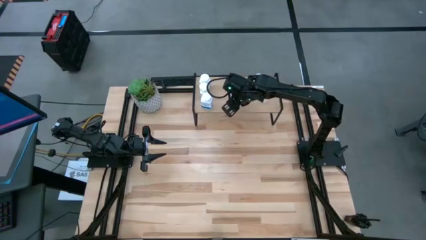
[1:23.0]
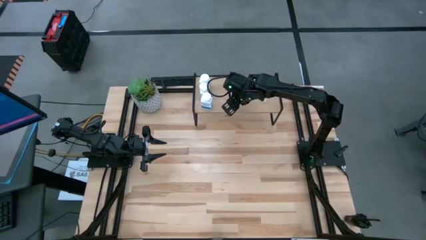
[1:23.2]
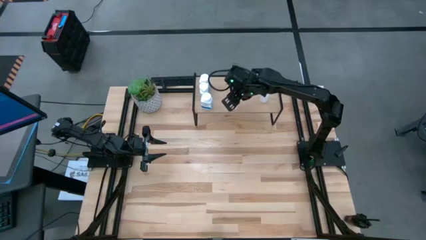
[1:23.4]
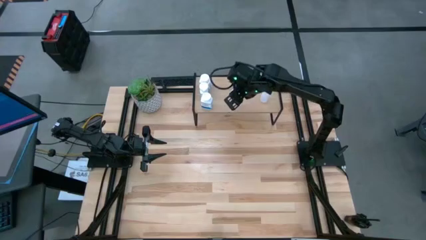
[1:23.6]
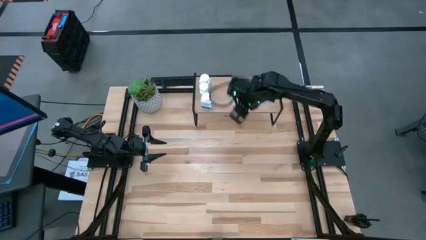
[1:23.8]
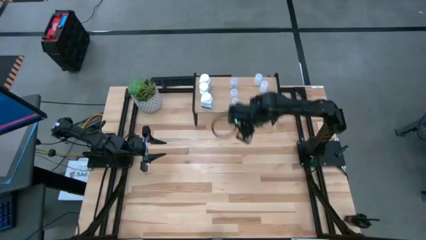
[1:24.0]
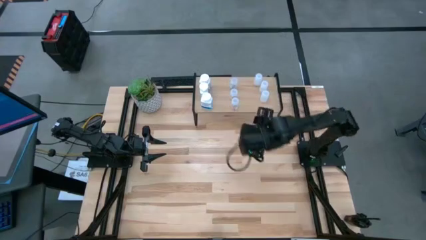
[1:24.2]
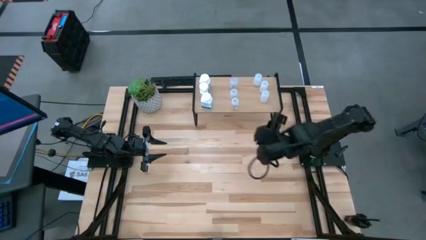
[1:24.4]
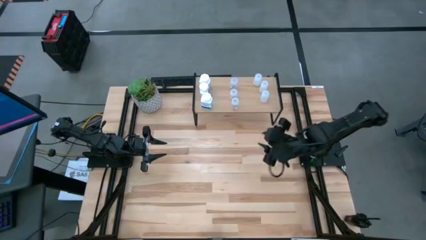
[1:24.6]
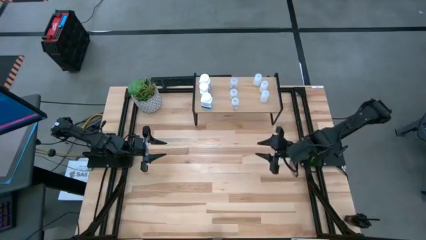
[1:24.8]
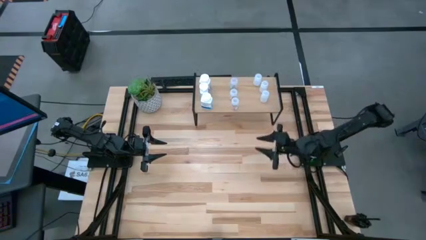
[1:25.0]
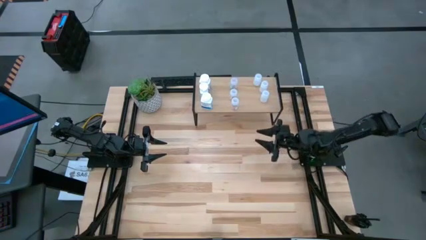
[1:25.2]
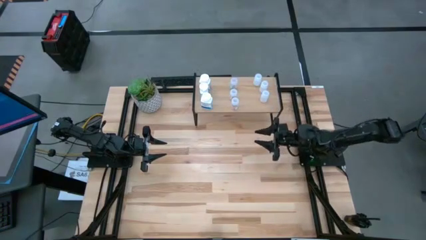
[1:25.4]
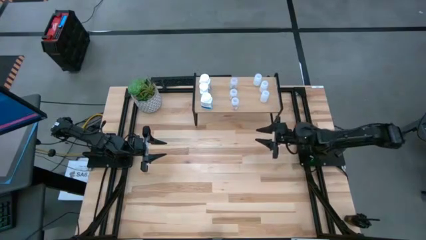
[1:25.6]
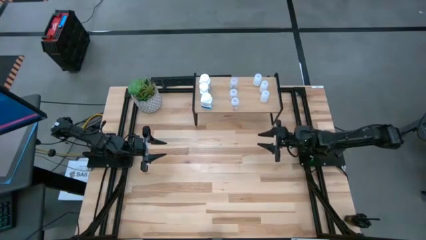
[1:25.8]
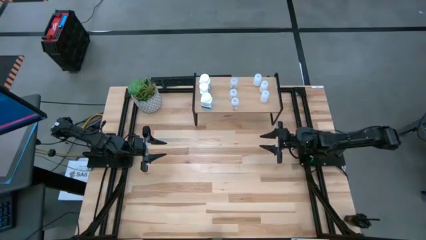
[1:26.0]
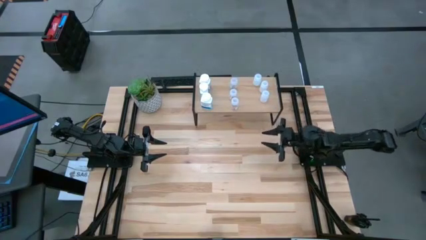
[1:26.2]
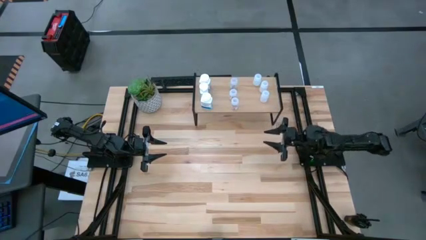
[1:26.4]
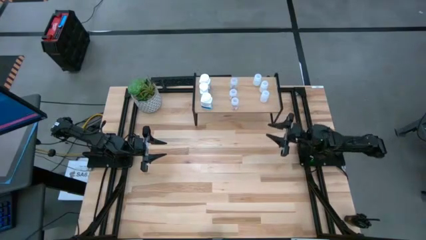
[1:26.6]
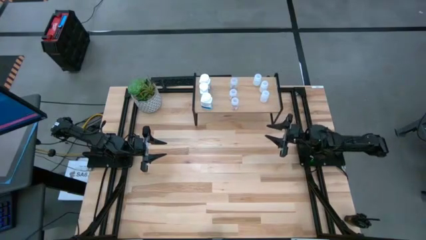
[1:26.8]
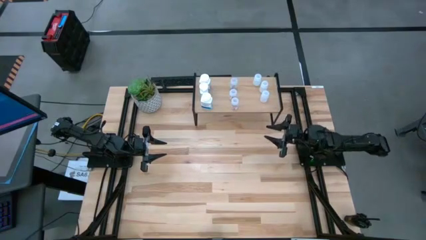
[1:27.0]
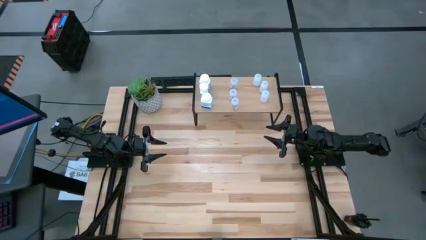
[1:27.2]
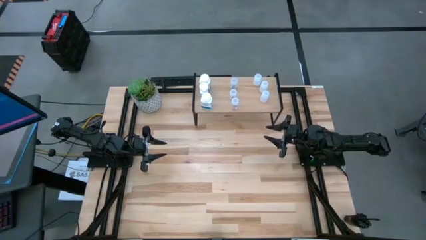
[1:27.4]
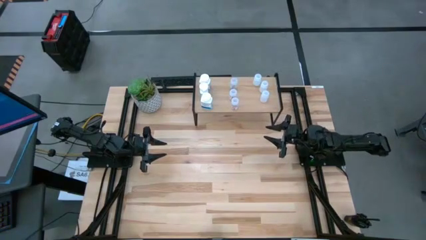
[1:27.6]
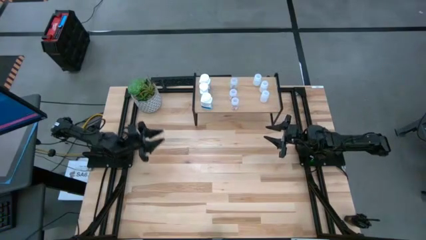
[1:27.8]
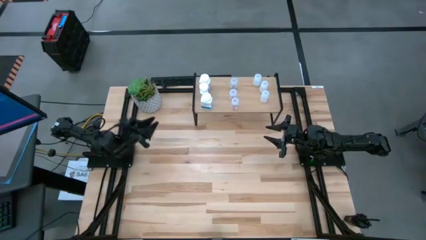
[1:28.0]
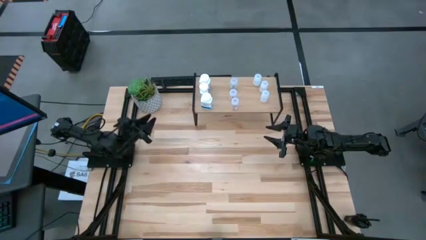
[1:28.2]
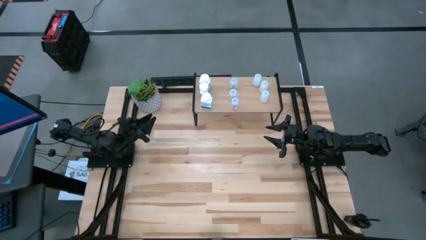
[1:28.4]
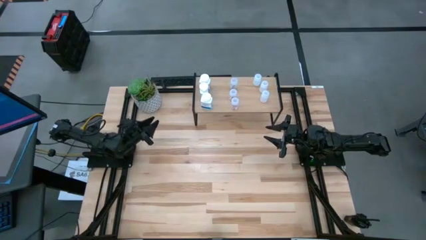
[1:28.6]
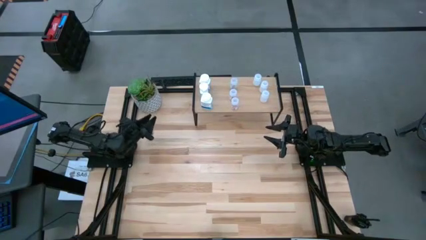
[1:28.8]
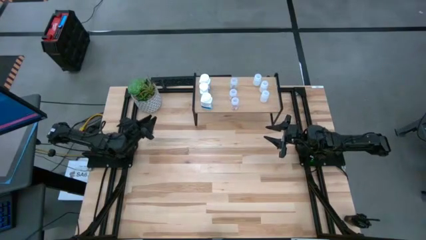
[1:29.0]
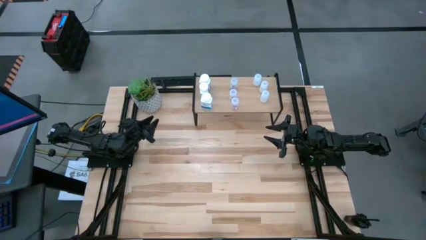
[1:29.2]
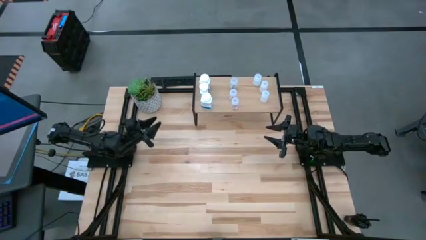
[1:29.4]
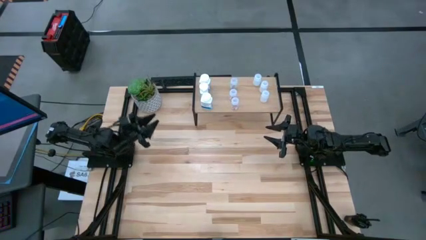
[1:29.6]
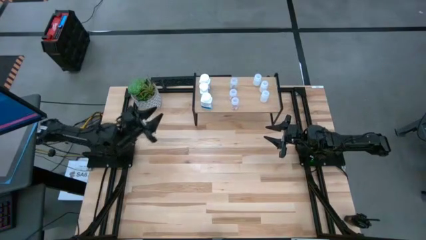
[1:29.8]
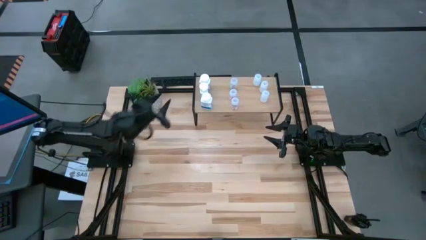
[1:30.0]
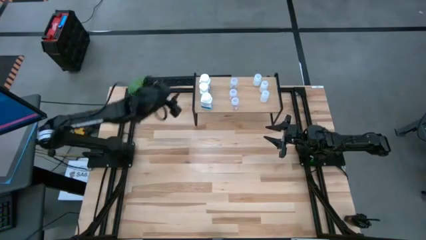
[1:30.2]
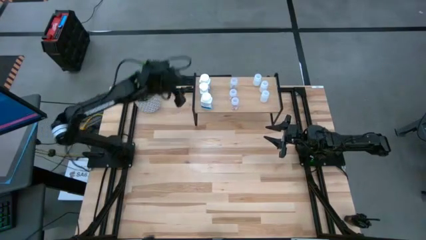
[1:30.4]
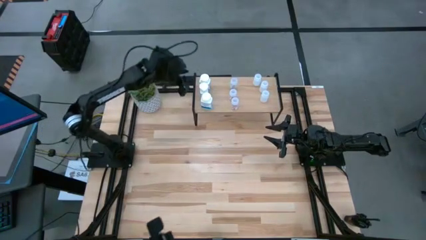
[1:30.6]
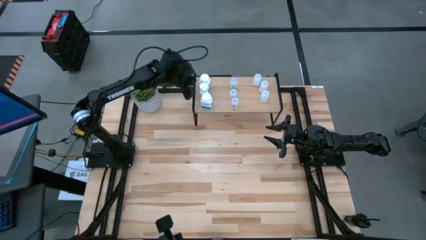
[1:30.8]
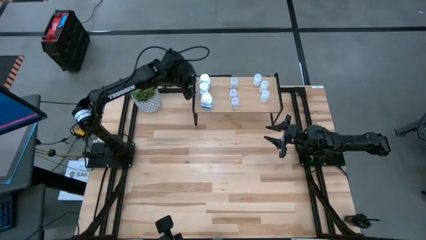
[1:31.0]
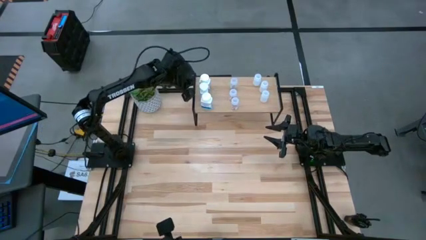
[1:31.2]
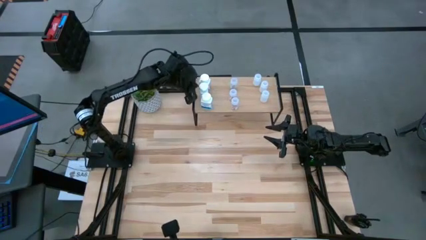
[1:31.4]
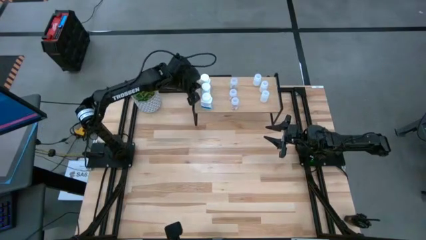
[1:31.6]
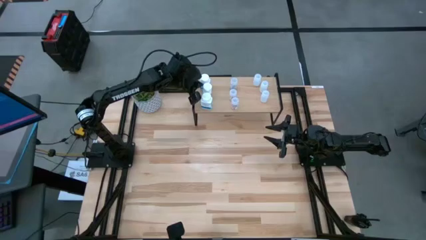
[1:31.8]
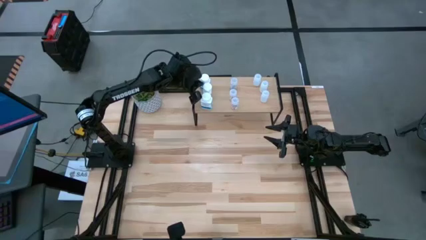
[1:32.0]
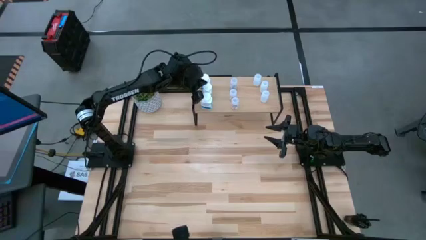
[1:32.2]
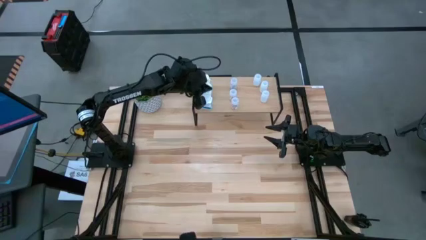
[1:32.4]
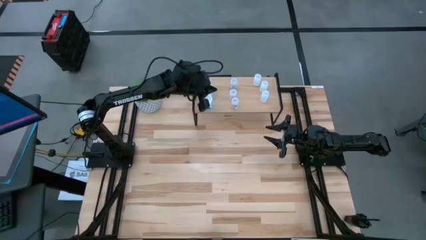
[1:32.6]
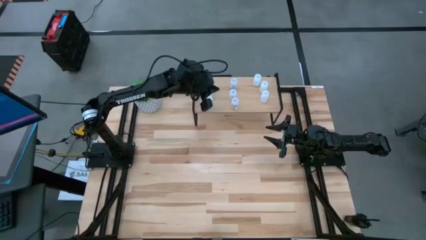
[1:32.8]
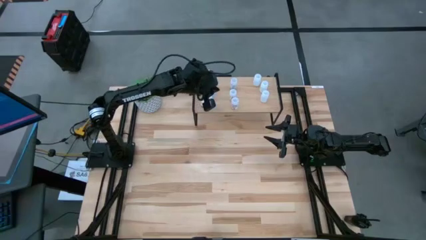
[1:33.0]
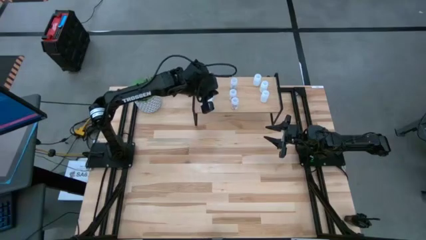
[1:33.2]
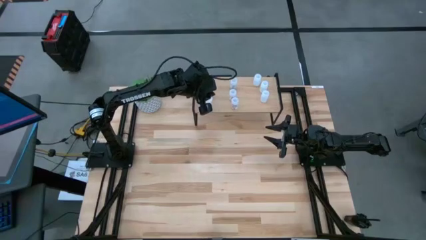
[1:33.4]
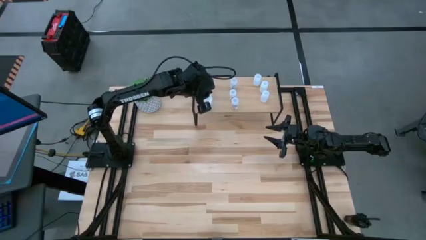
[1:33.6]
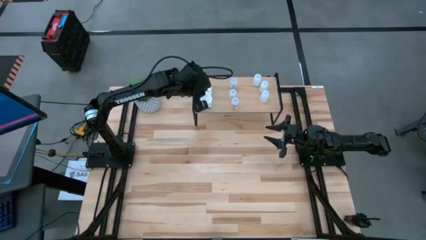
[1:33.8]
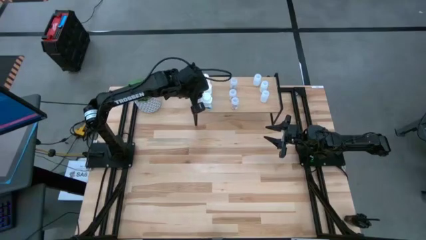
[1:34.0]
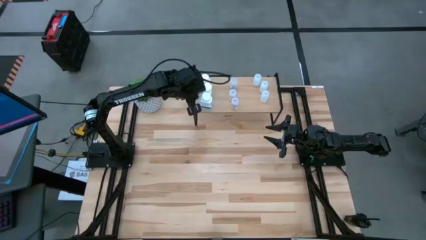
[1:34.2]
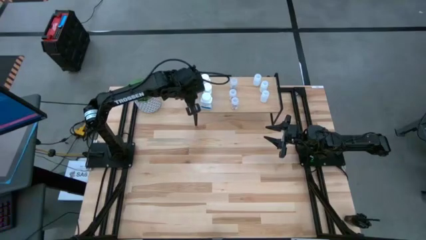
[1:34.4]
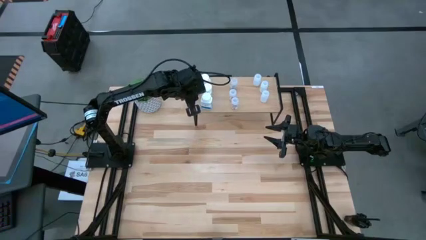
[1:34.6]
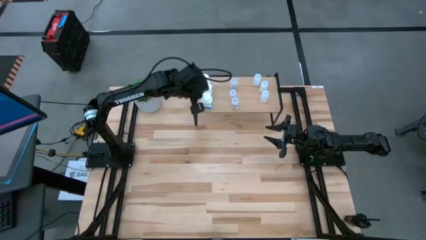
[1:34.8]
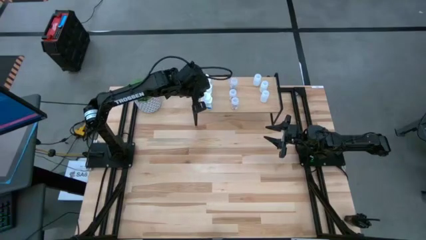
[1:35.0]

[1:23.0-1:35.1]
Task: Pick and place medicine bottles onto shelf by color
Adjust the big white pill bottles on the shelf
